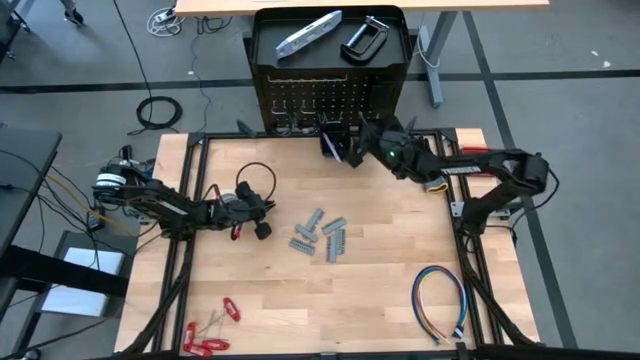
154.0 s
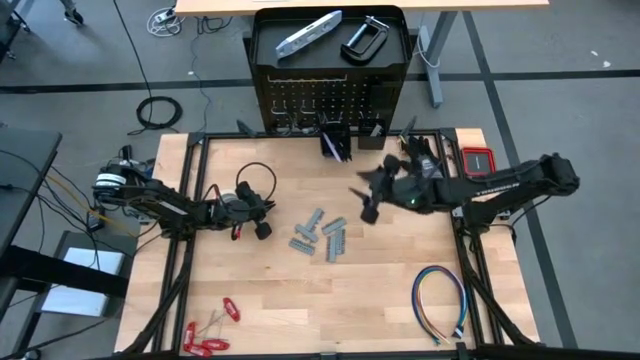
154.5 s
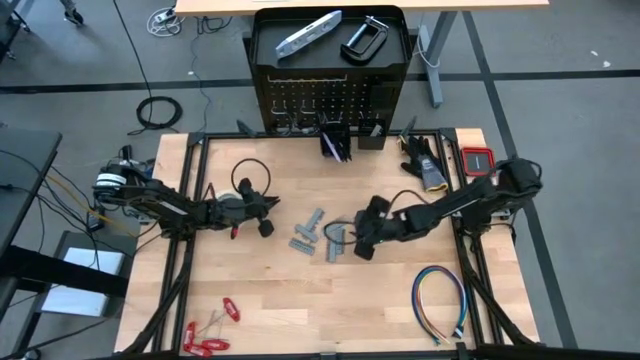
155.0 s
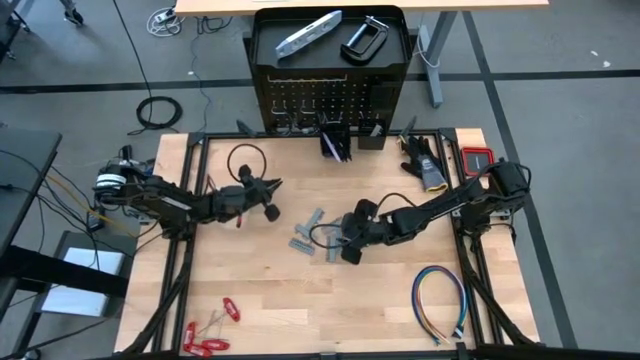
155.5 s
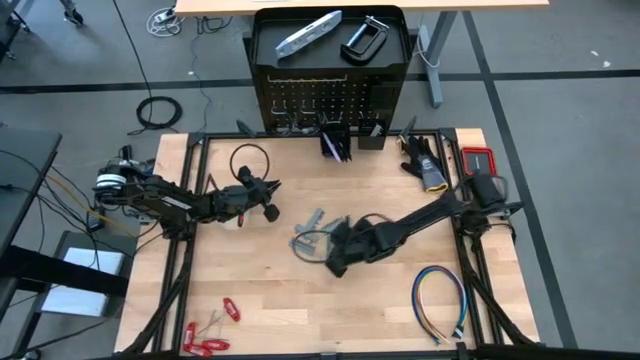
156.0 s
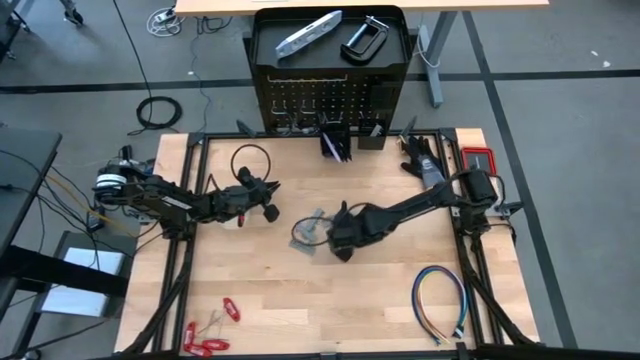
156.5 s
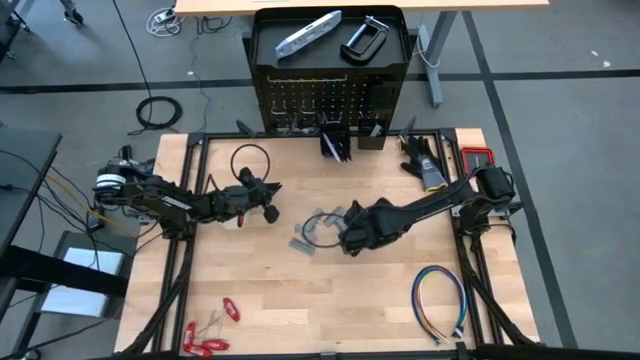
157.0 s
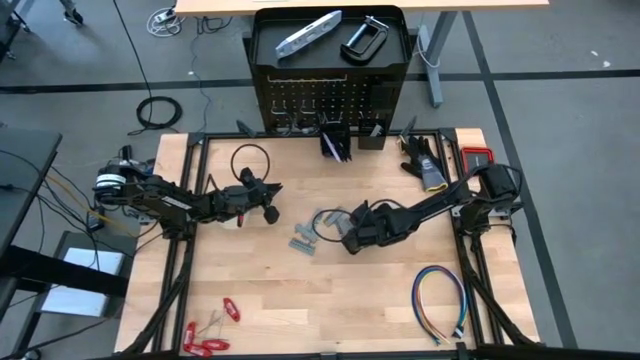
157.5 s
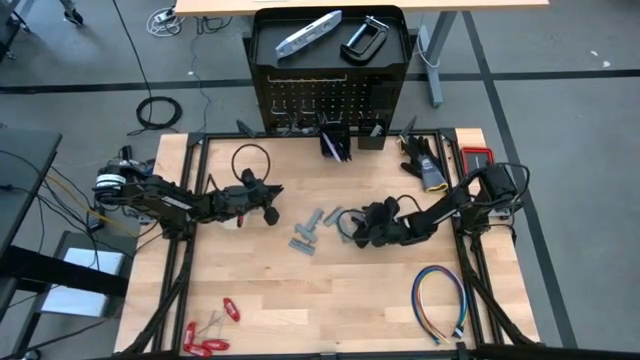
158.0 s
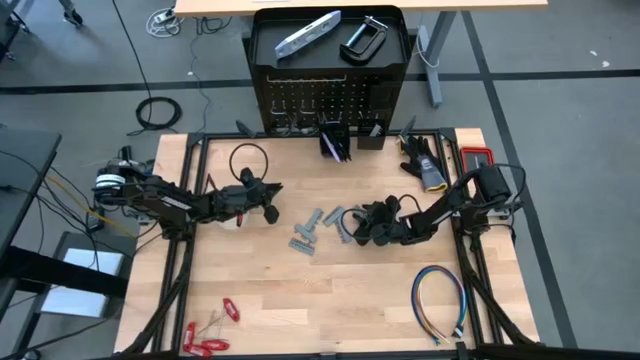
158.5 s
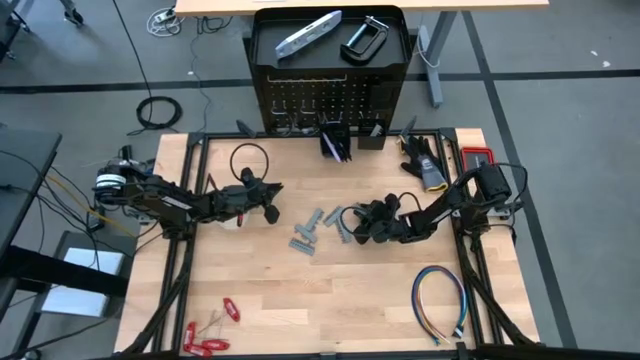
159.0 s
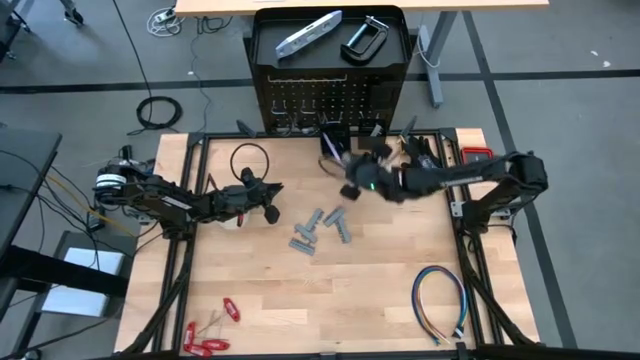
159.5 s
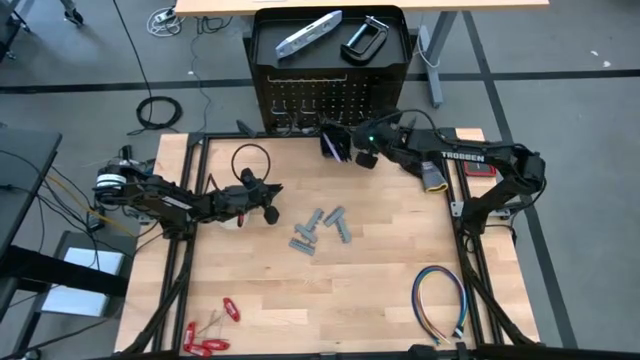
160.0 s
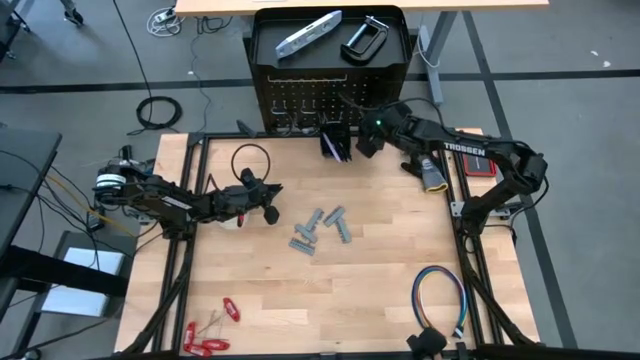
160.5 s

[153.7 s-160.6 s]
Task: Hang tools onto peg board
Put the gray screwdriver bit set into the right black bin on the peg board

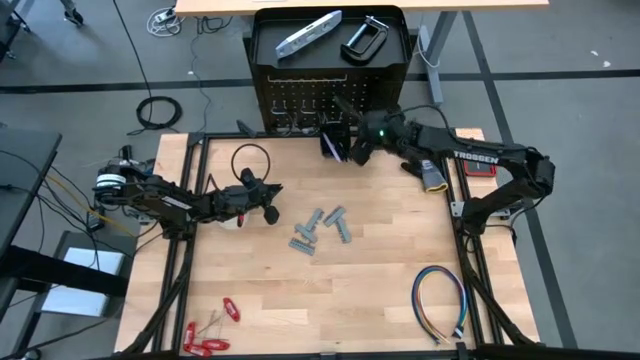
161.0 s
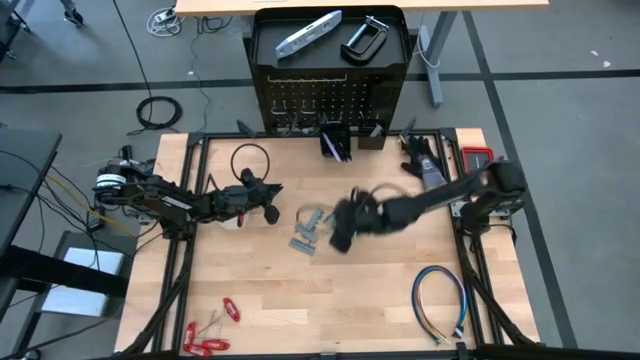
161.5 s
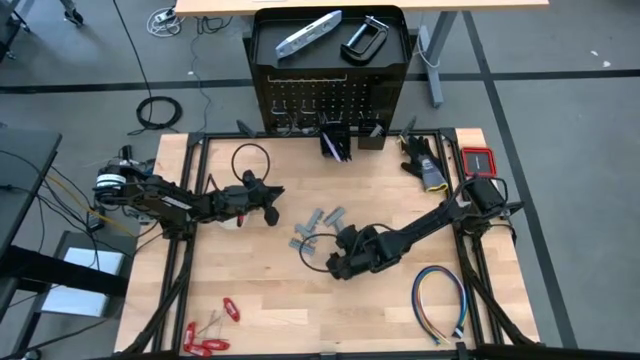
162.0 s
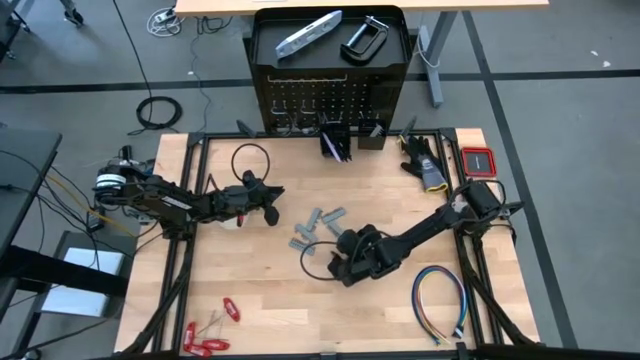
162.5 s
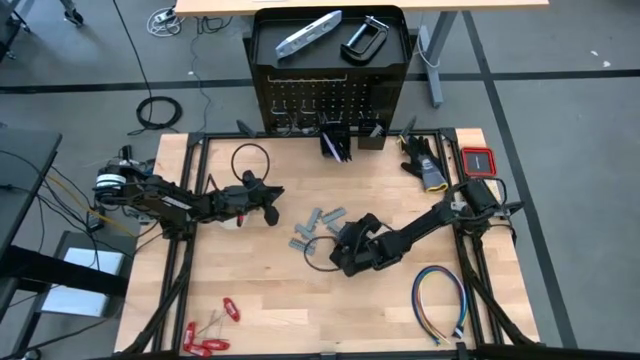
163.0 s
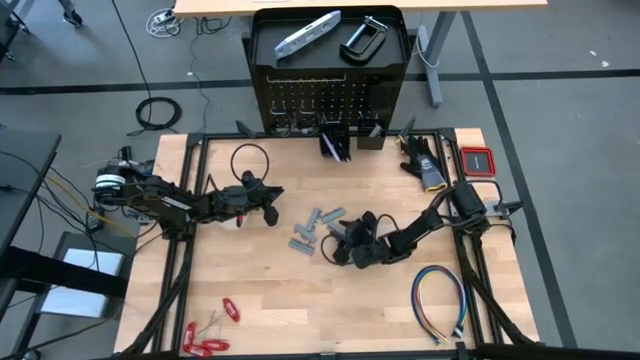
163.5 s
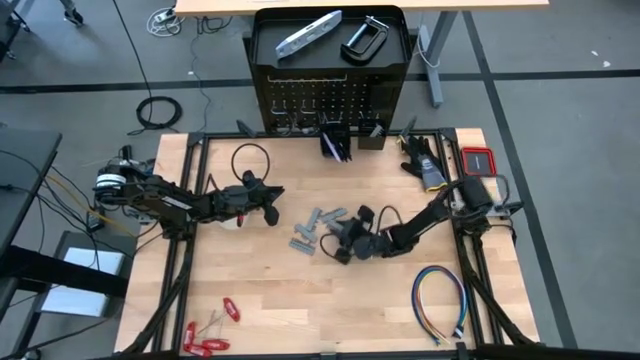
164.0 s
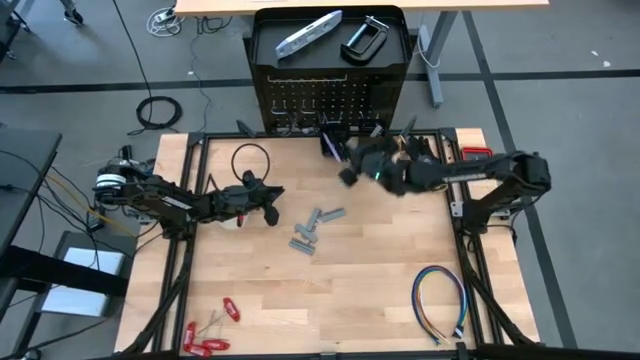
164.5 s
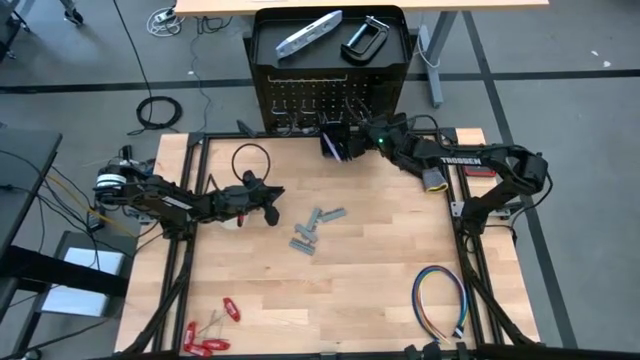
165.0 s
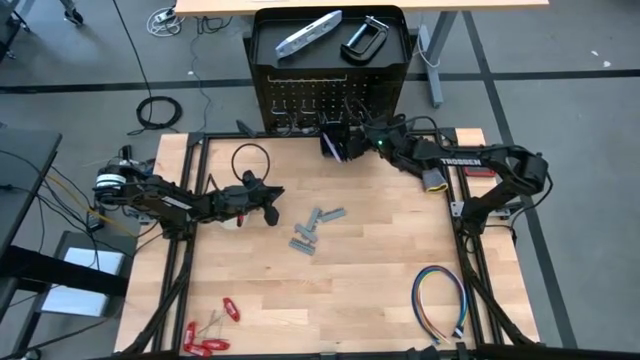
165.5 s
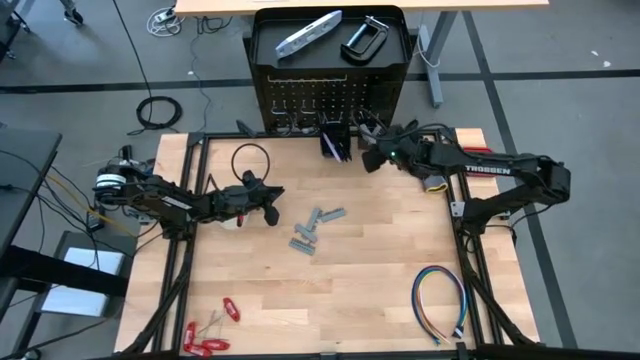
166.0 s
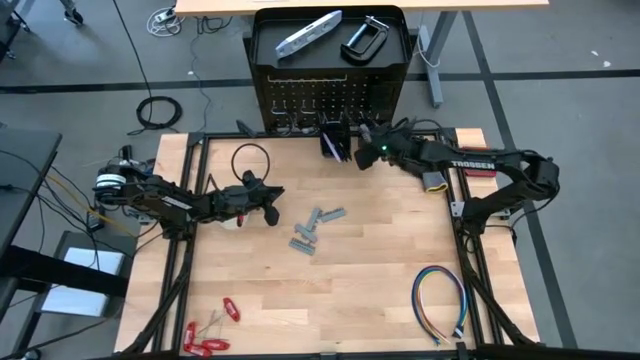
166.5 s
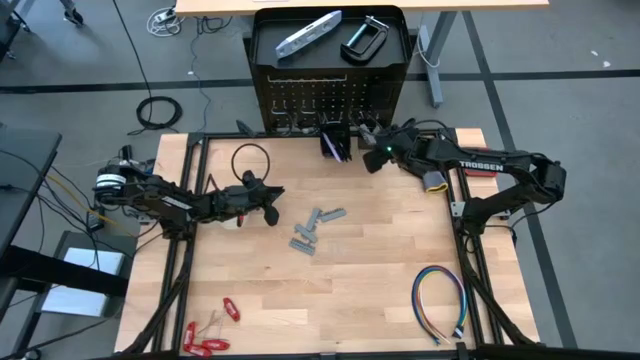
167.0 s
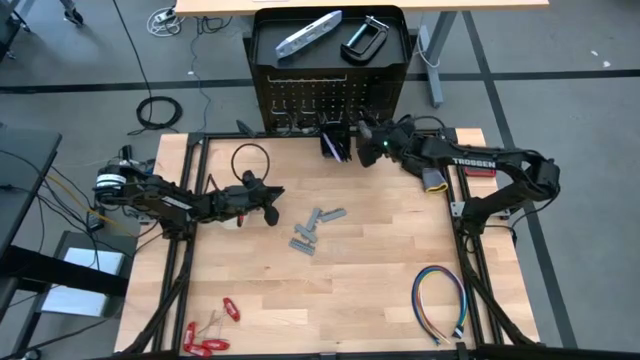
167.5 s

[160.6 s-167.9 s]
Put the gray screwdriver bit set into the right black bin on the peg board

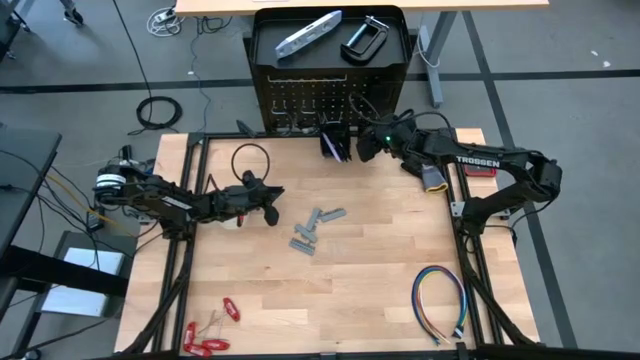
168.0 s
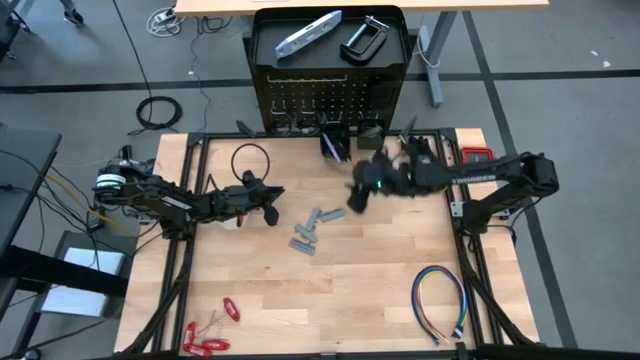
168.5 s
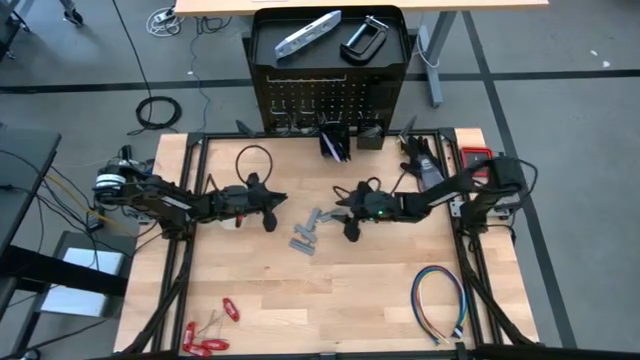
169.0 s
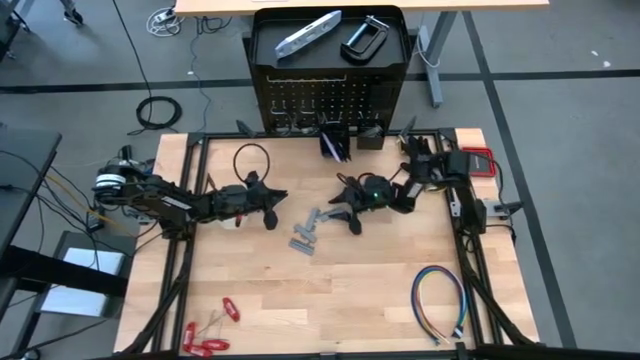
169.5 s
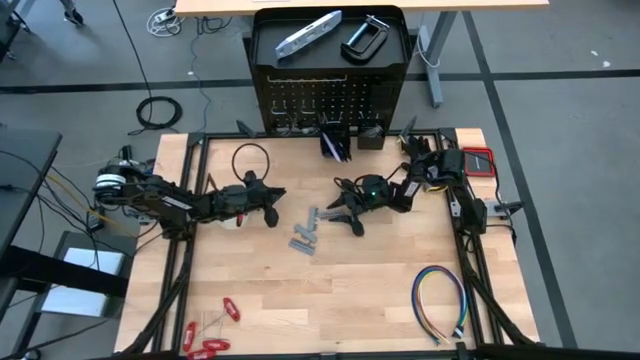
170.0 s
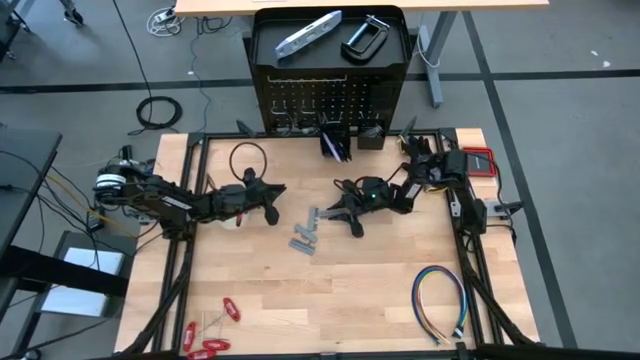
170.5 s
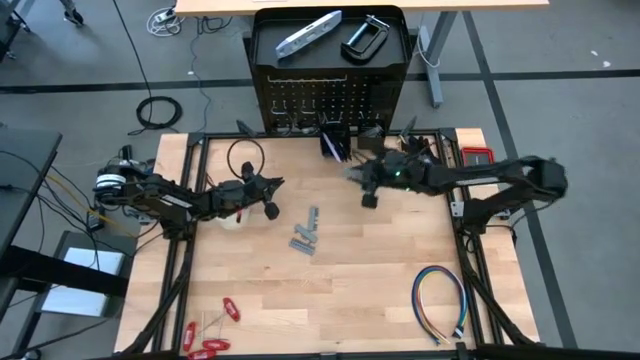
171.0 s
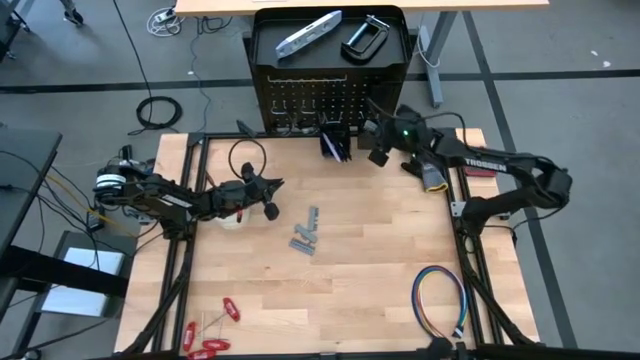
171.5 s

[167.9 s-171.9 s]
Put the gray screwdriver bit set into the right black bin on the peg board

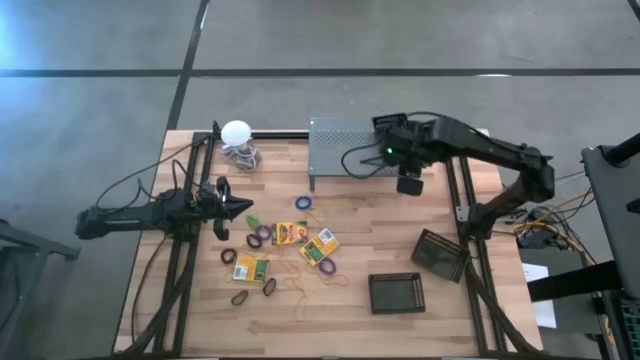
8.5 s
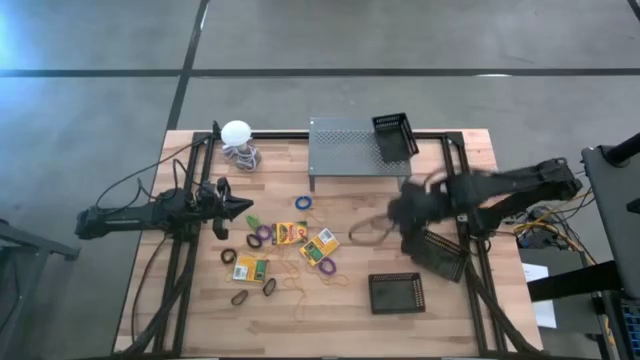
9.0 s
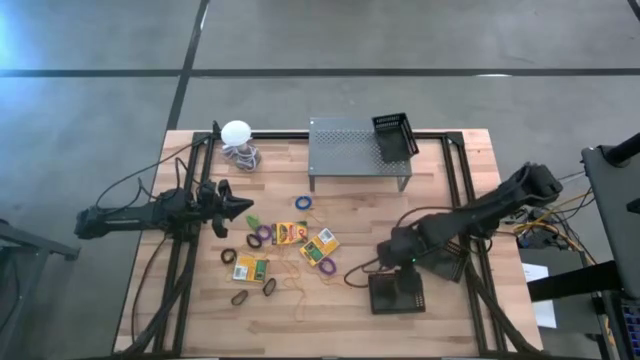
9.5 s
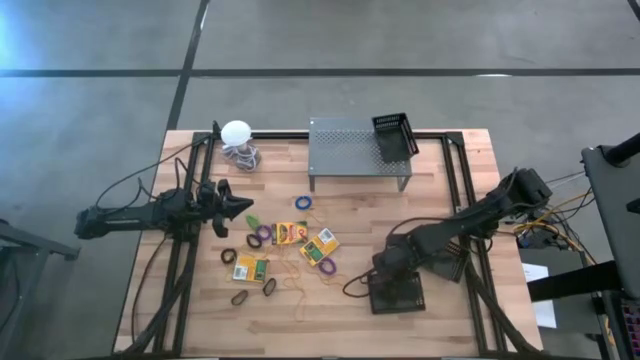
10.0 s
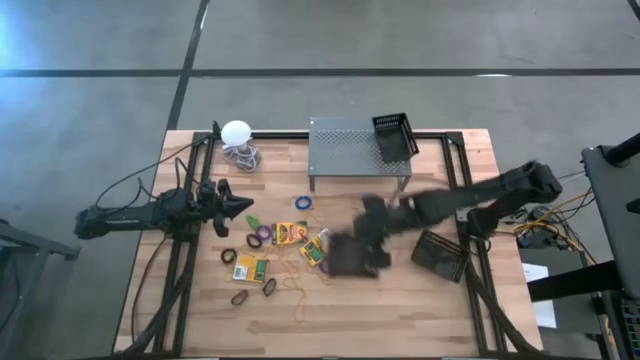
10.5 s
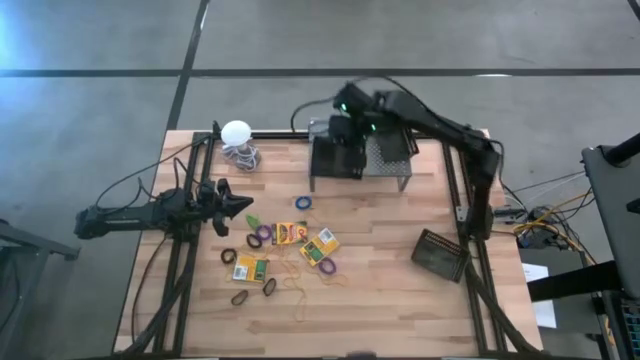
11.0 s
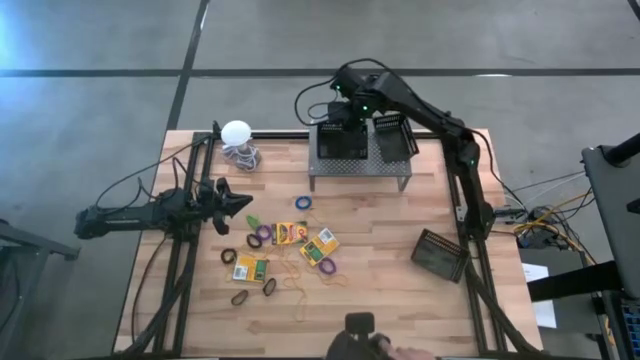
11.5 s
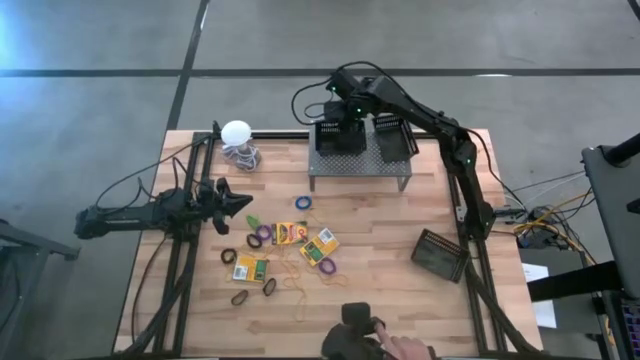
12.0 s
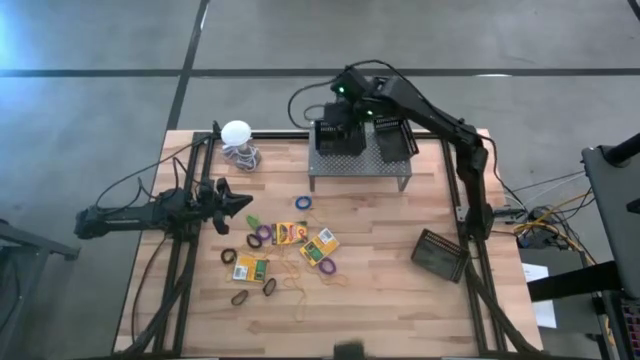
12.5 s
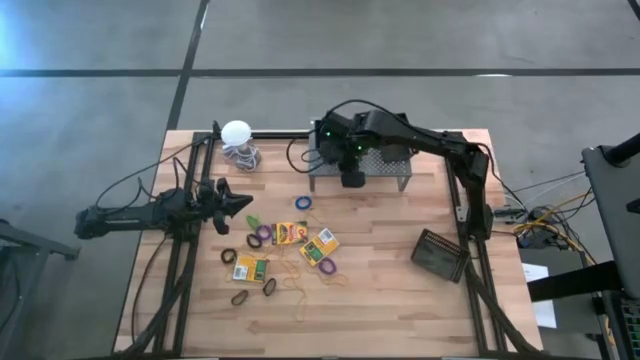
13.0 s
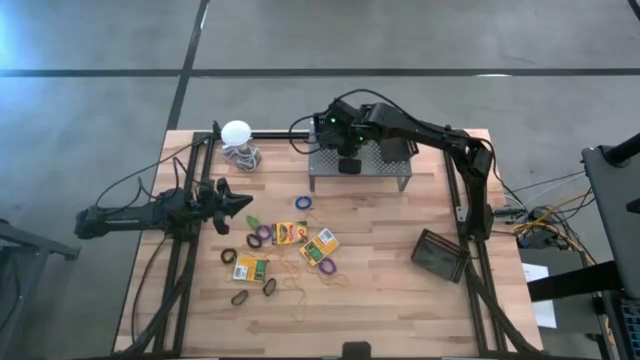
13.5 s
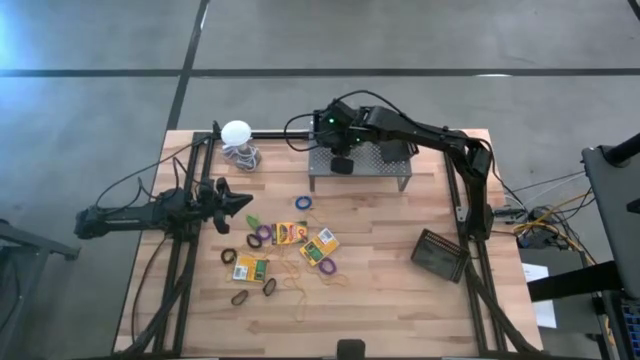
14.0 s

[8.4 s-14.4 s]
Task: Pick & Place Office Desk Supplies
Put the bottom black bin on the shelf
